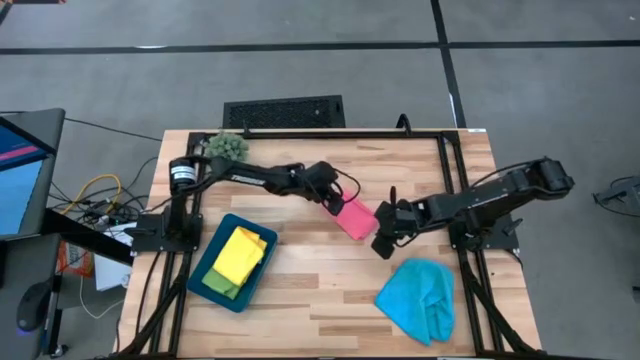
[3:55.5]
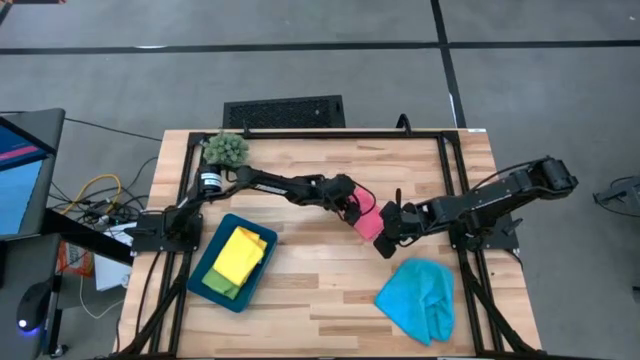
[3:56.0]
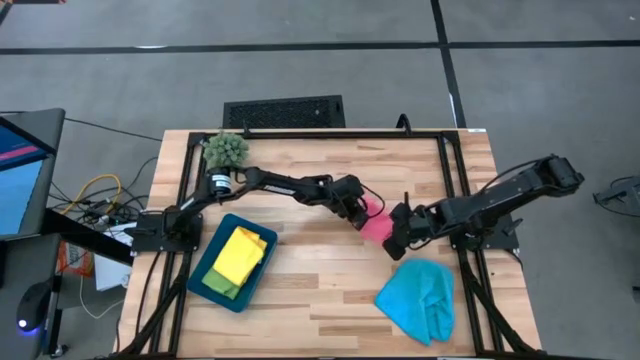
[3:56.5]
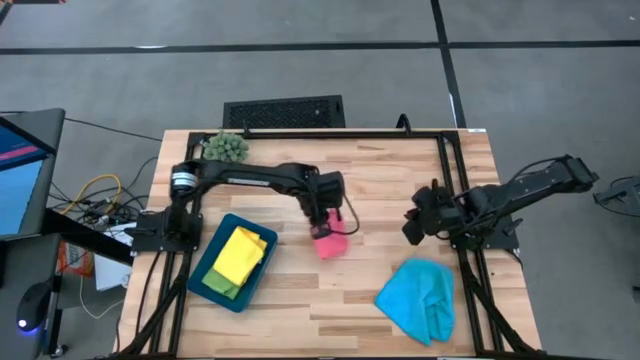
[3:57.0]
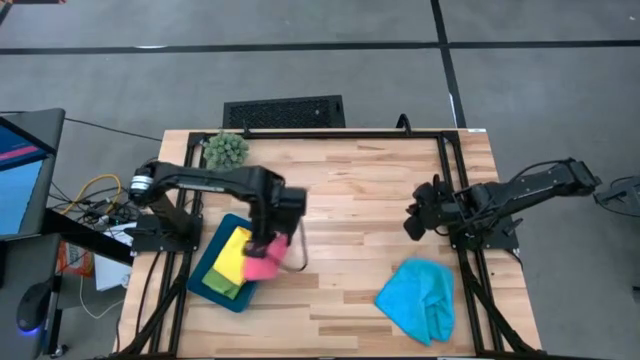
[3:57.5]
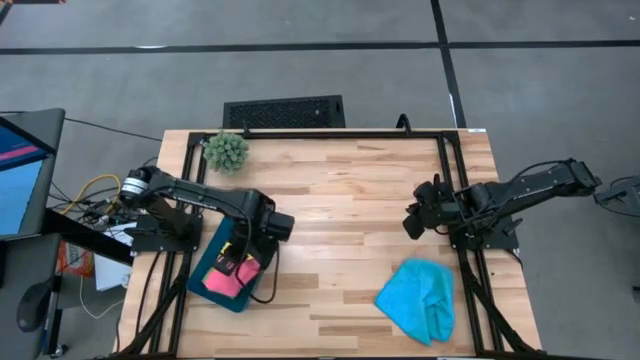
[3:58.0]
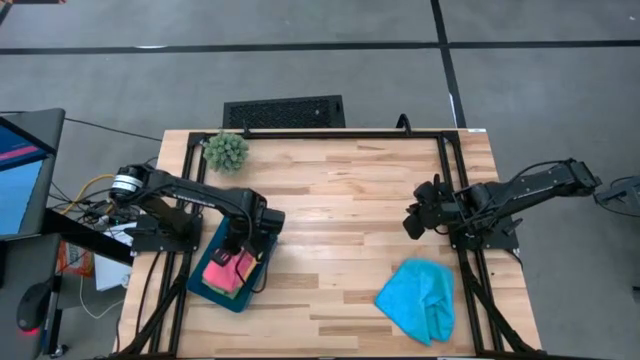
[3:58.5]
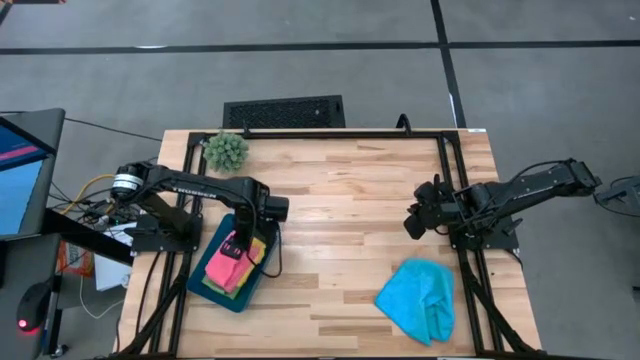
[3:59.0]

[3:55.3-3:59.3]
Task: Fold microfiber towels
Put the pink microfiber towel on the blue bin

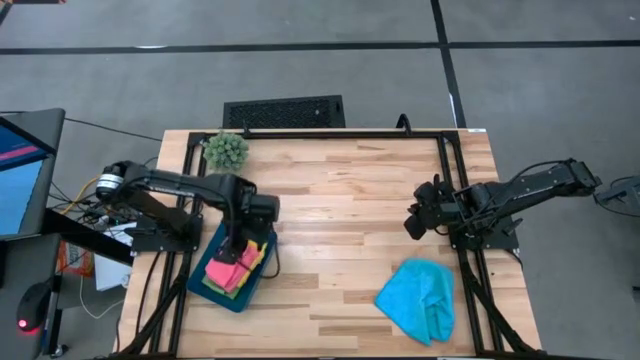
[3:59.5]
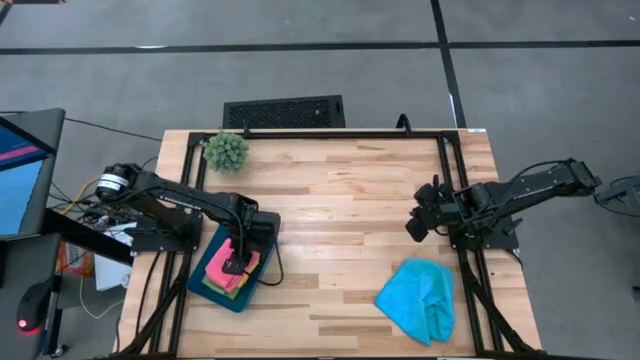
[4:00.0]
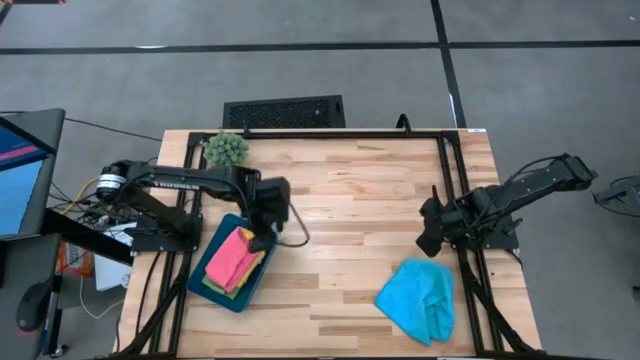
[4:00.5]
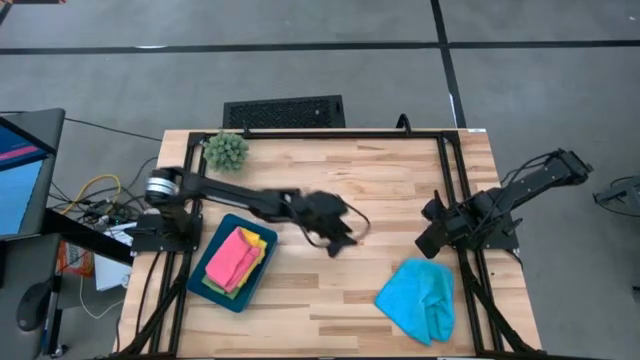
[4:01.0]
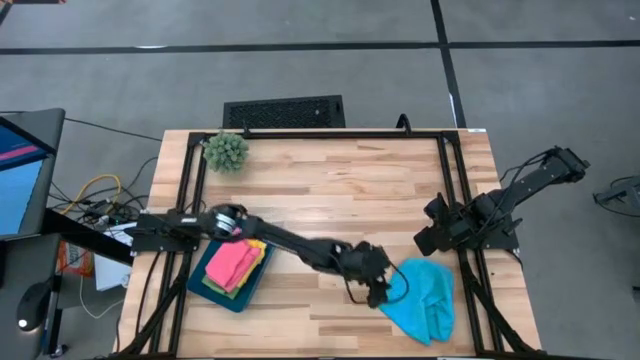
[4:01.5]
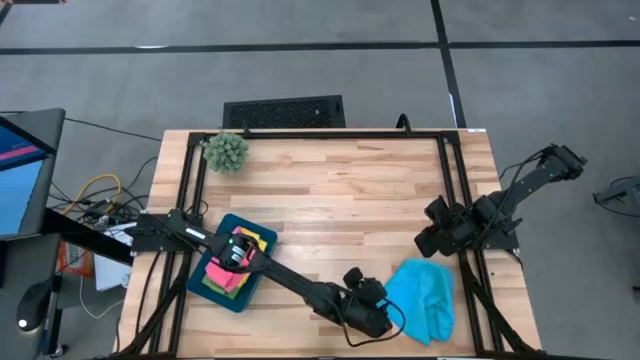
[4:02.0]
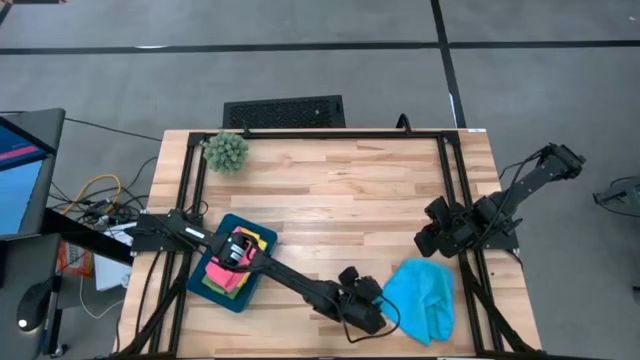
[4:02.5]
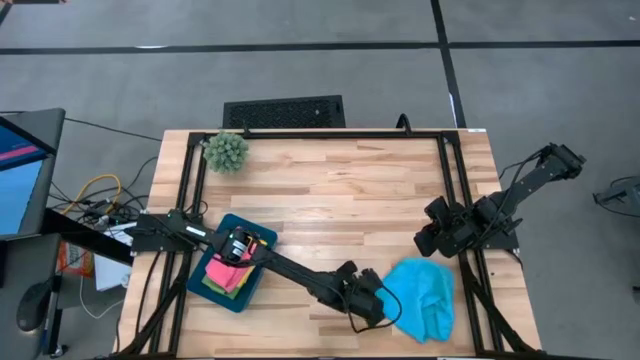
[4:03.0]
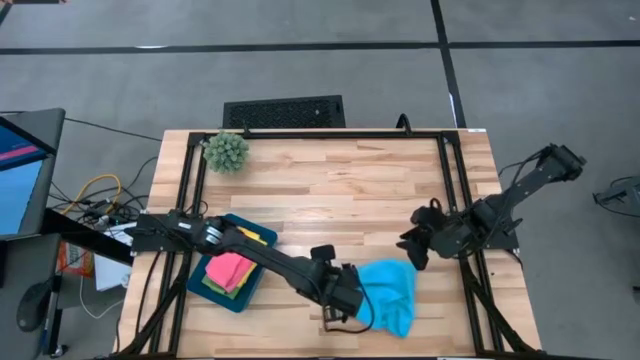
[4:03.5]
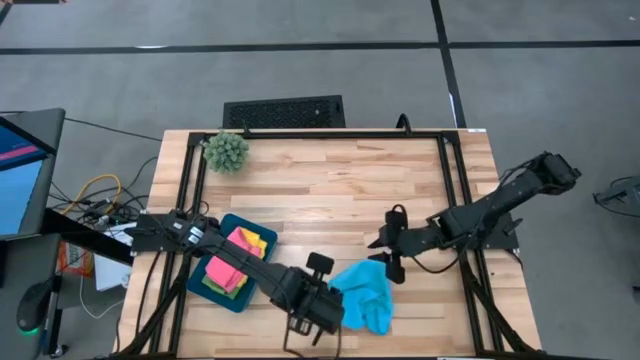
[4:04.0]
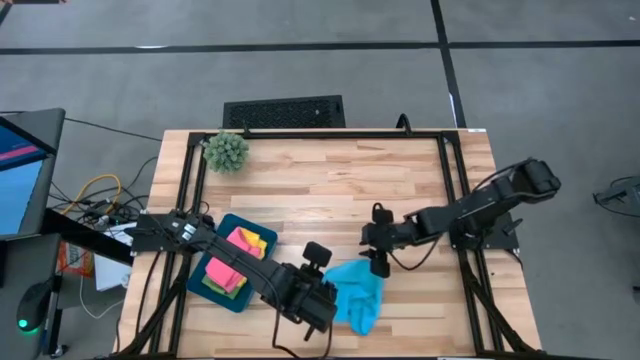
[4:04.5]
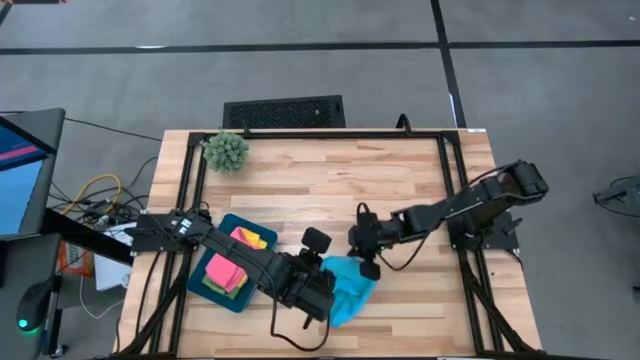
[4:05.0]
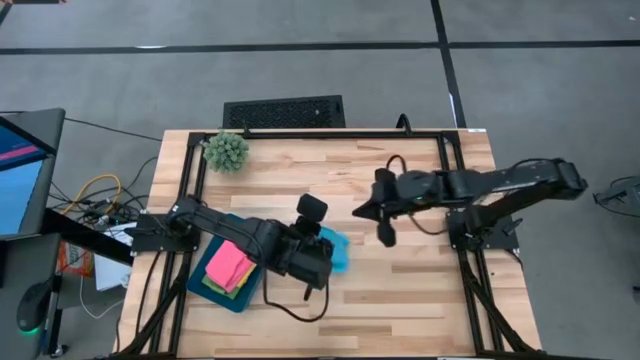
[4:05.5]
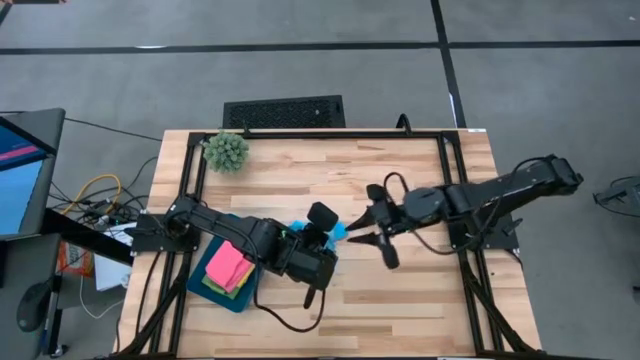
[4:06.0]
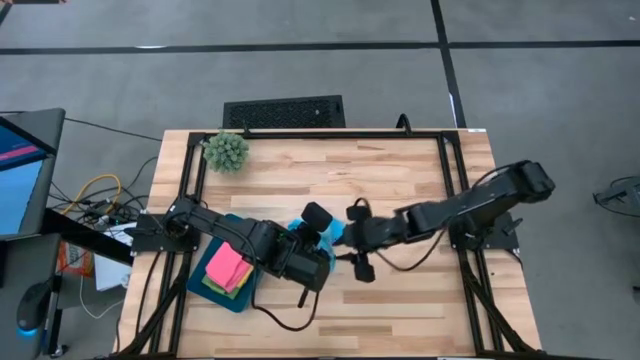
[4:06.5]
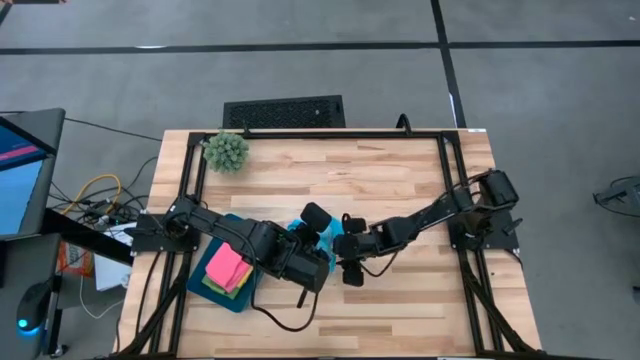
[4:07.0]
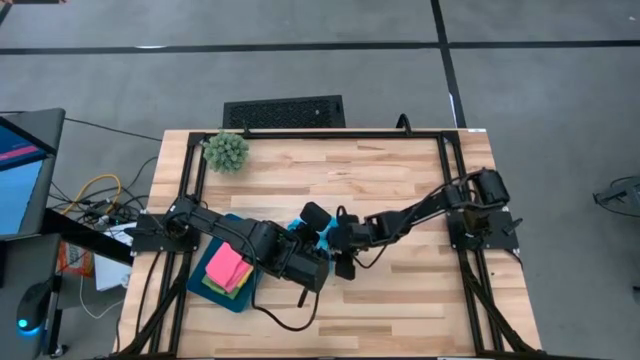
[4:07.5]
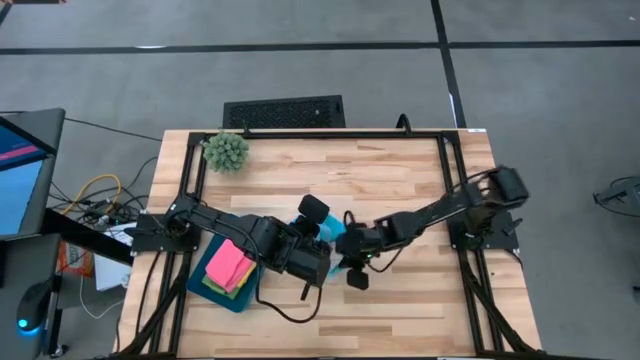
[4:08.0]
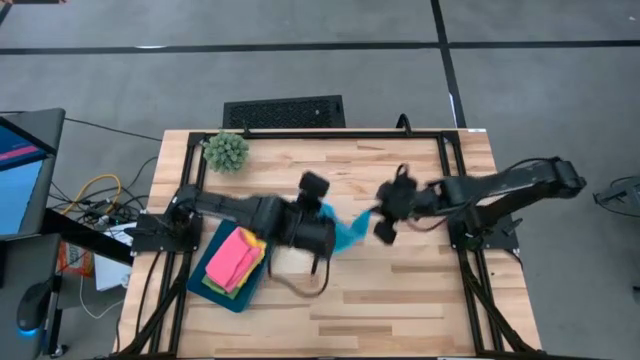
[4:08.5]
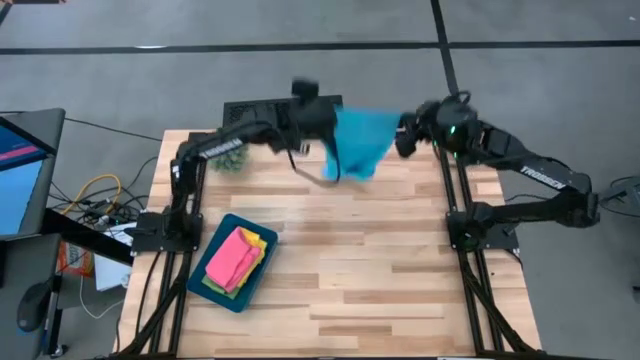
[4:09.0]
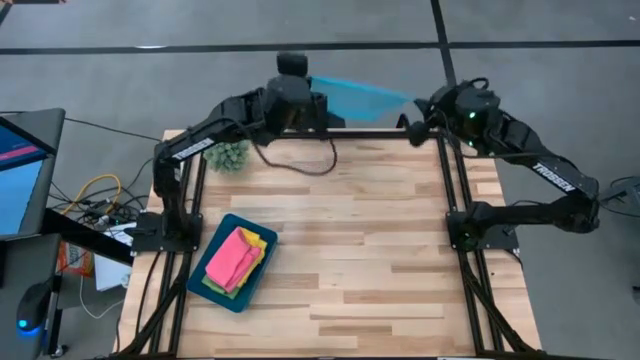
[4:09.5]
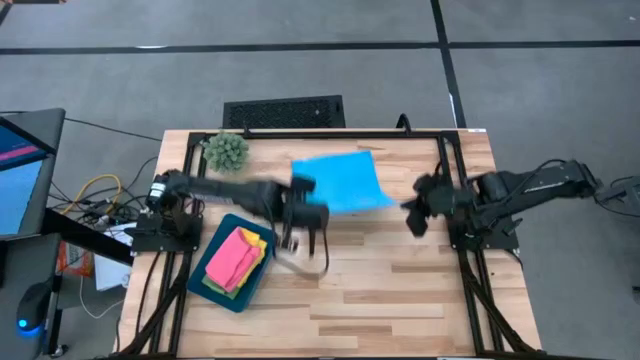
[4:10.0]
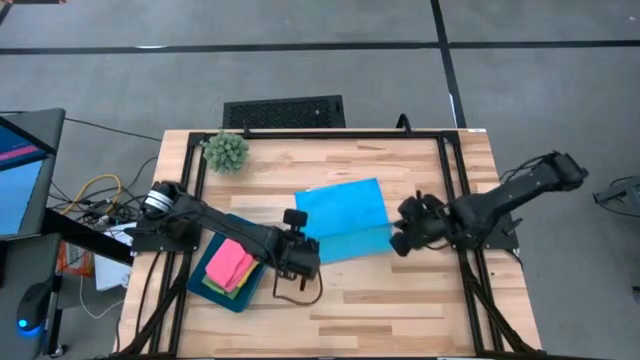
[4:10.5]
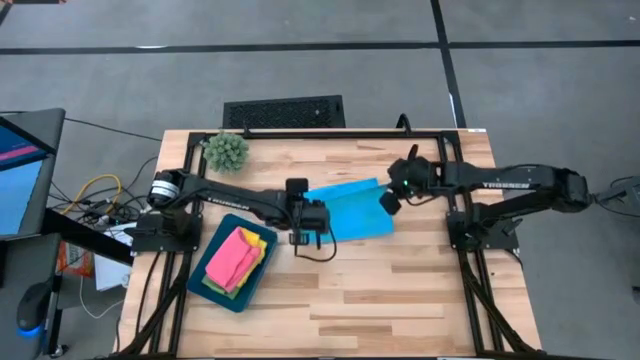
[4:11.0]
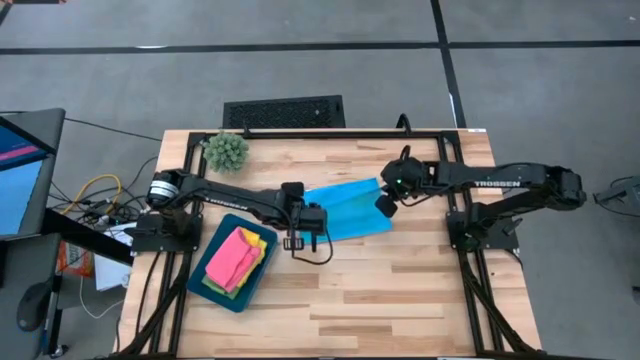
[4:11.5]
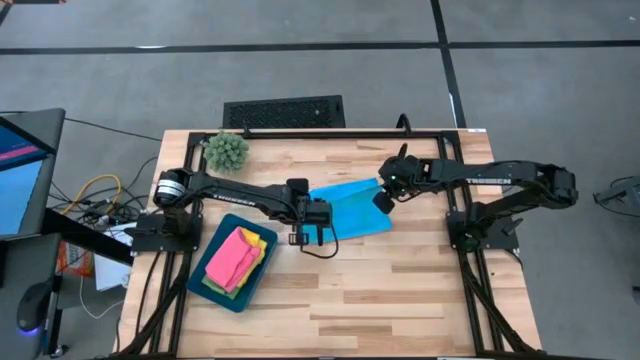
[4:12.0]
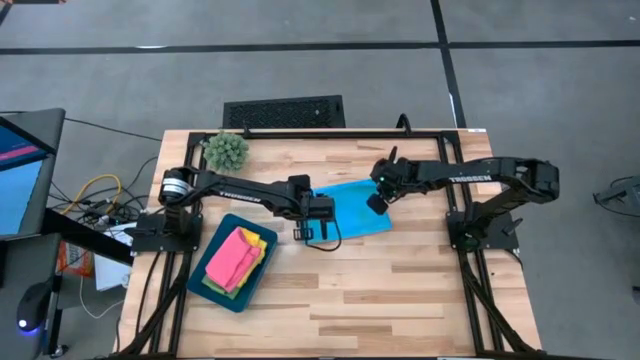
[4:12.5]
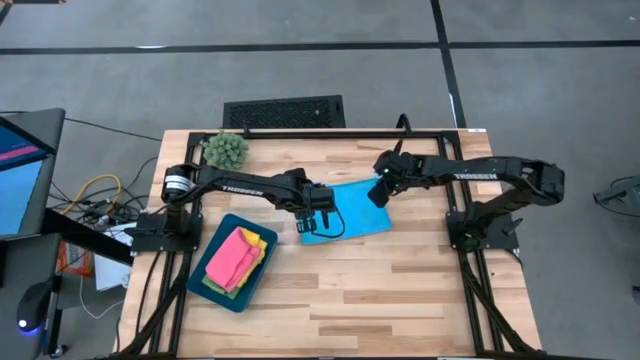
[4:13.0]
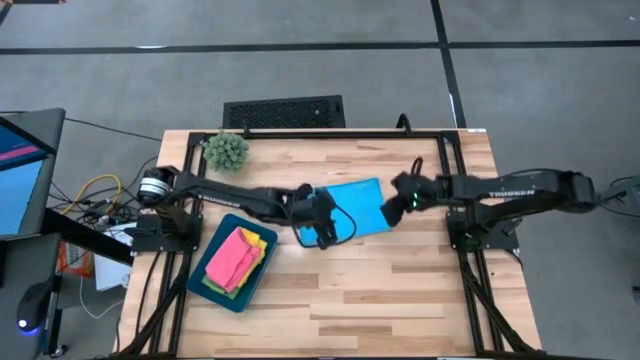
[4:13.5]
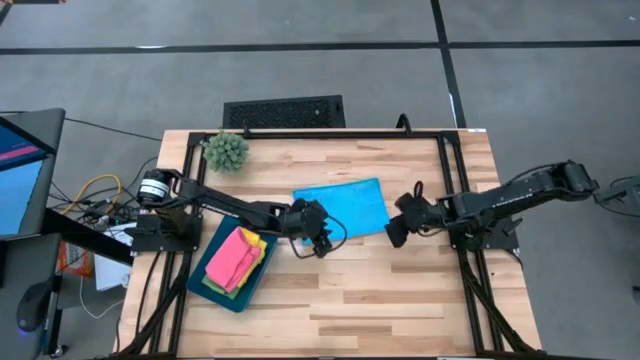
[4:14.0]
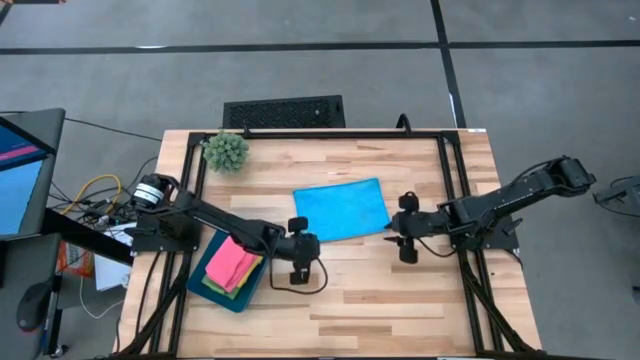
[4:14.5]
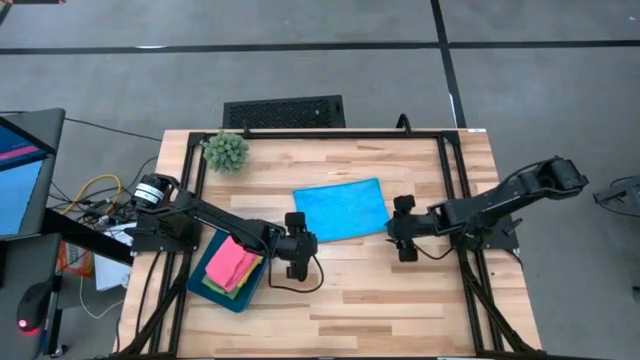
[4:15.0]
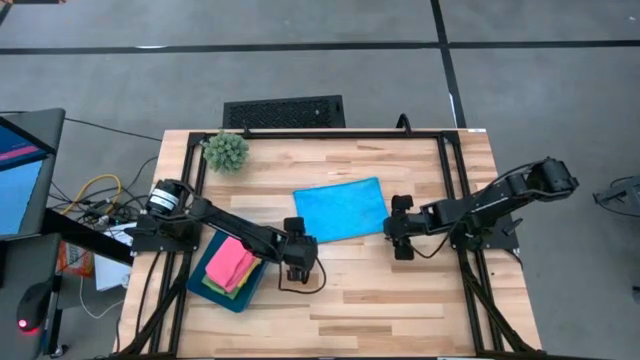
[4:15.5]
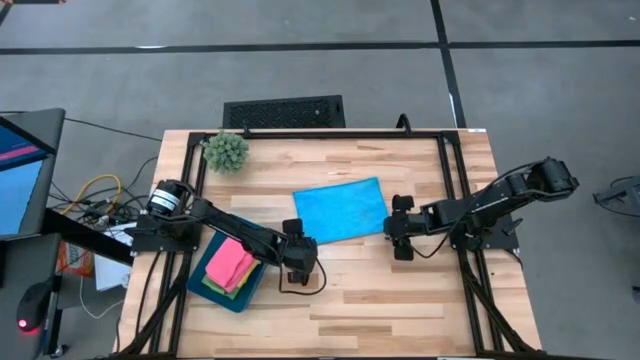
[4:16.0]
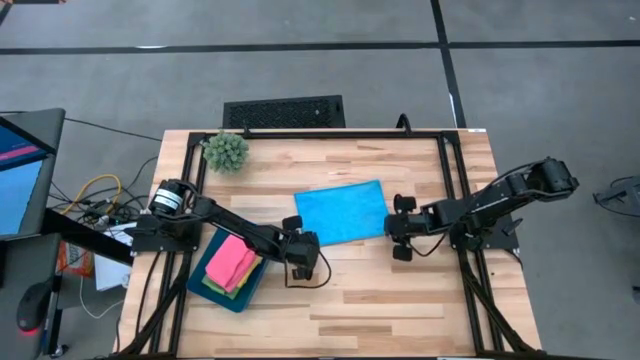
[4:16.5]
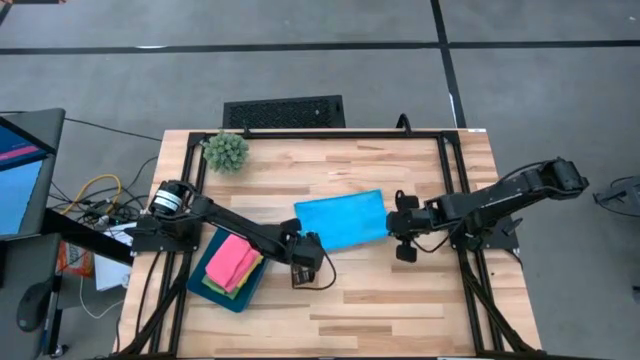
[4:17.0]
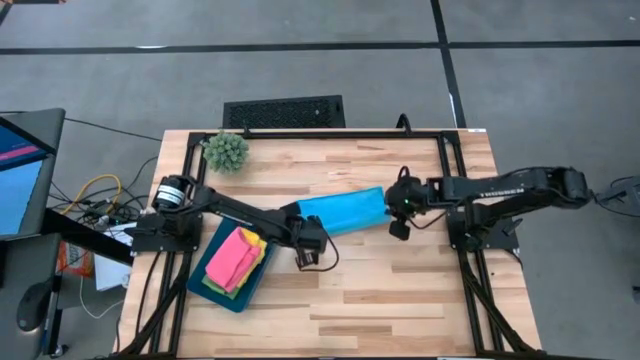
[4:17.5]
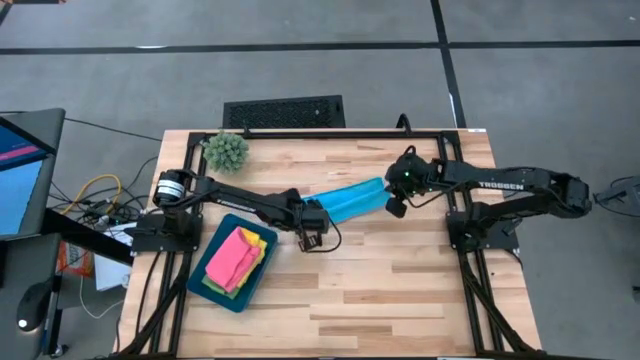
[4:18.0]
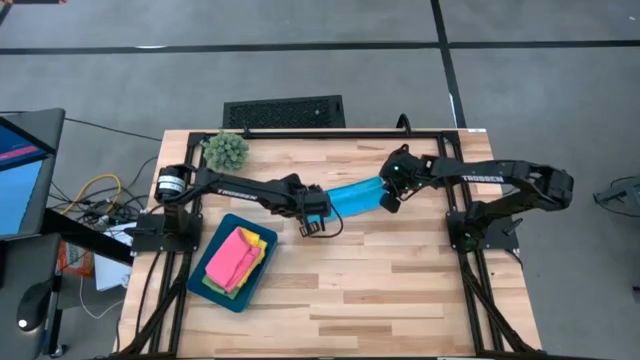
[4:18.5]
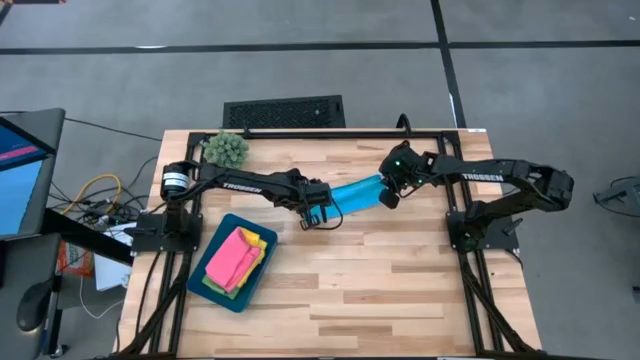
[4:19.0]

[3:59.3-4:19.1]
Fold the blue microfiber towel
